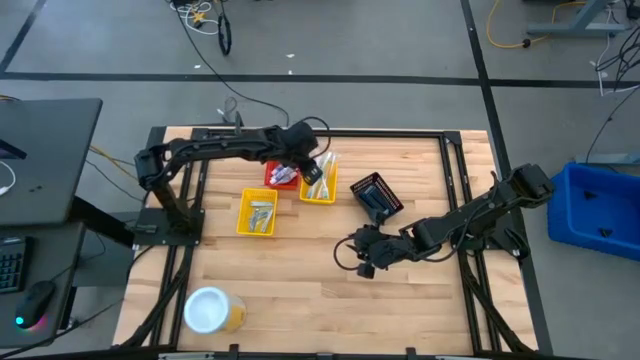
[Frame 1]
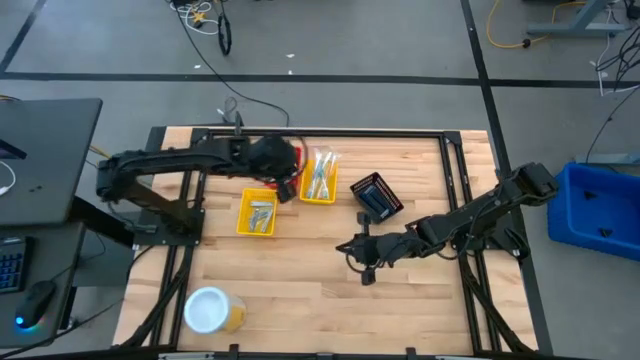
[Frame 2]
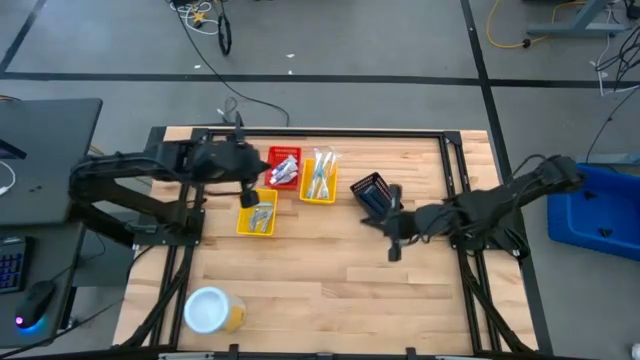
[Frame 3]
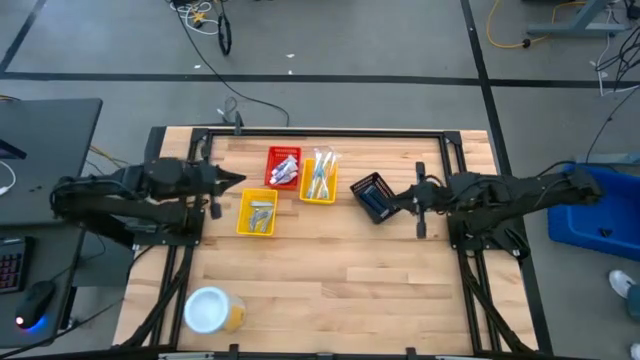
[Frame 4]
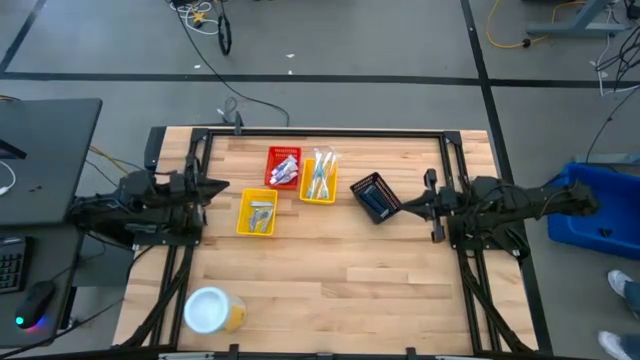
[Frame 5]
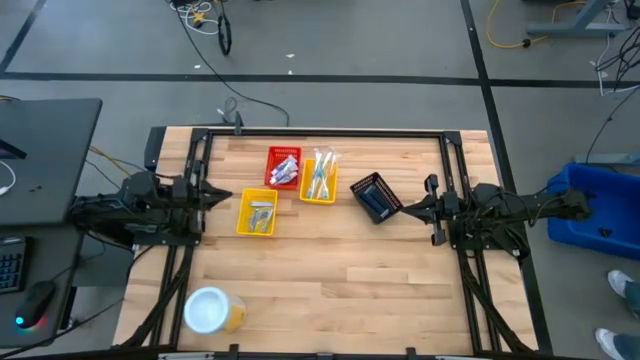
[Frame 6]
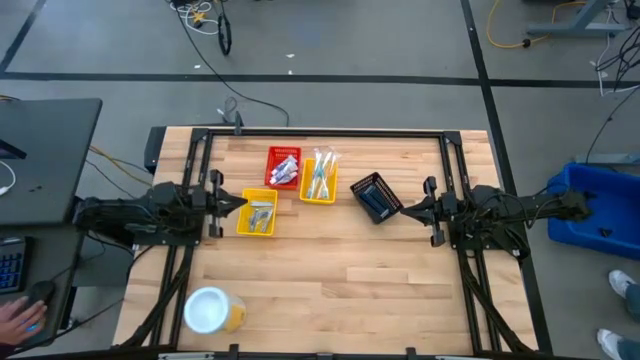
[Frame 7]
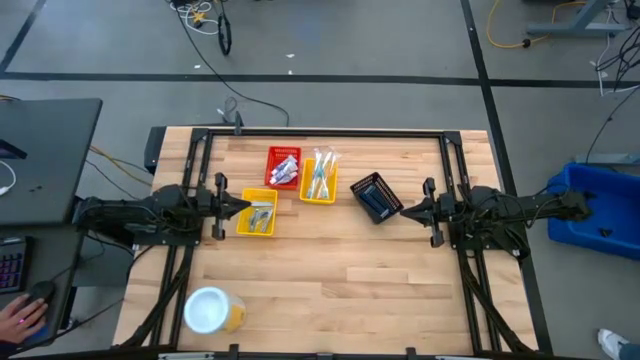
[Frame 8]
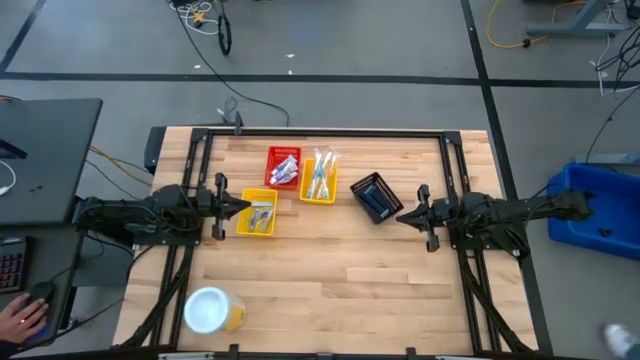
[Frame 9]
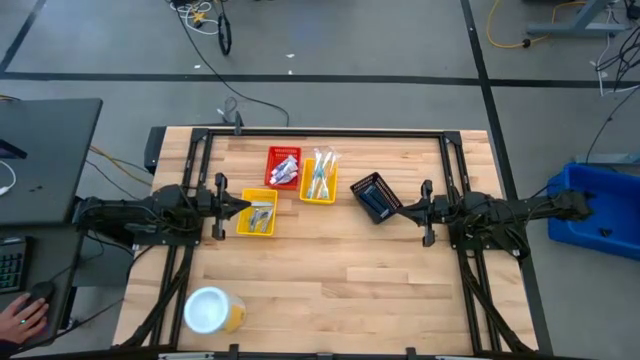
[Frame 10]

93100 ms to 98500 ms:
Task: Pick & Place Travel size toiletries
Return to Home Position

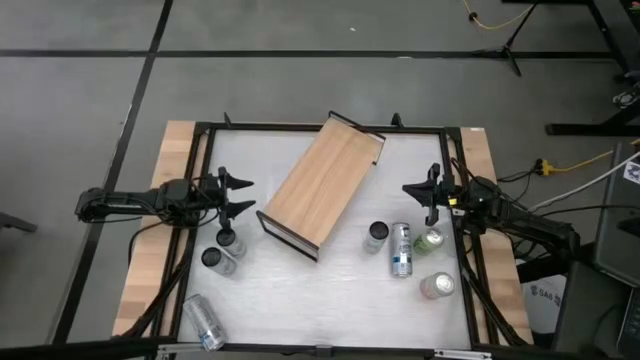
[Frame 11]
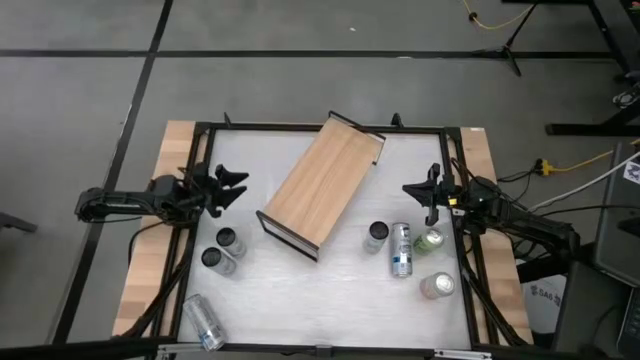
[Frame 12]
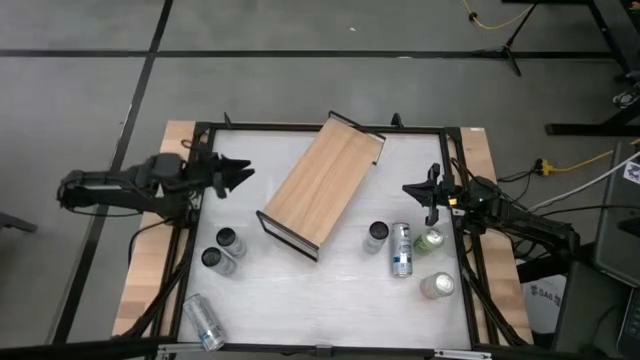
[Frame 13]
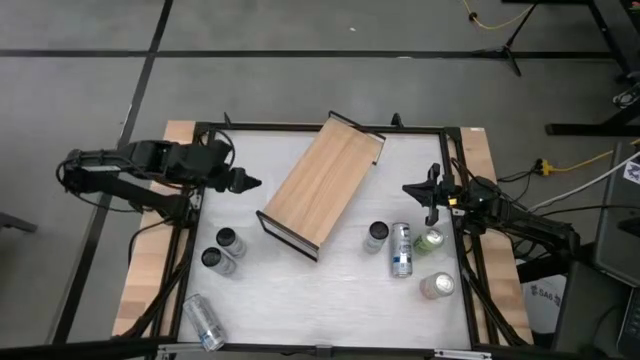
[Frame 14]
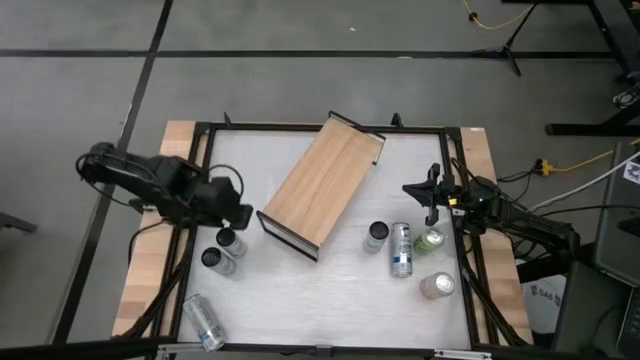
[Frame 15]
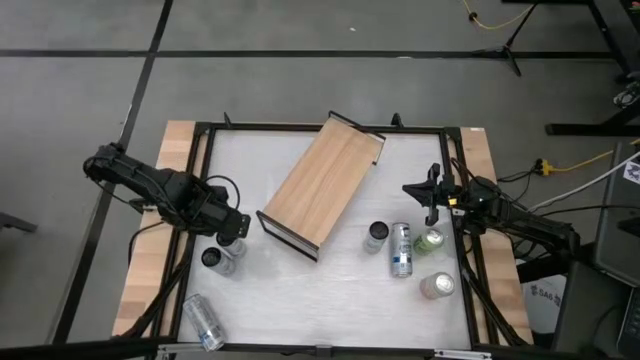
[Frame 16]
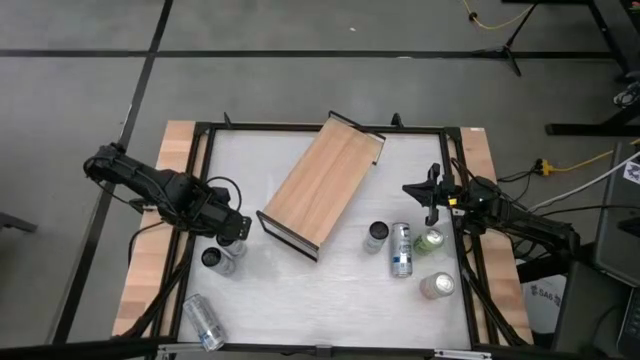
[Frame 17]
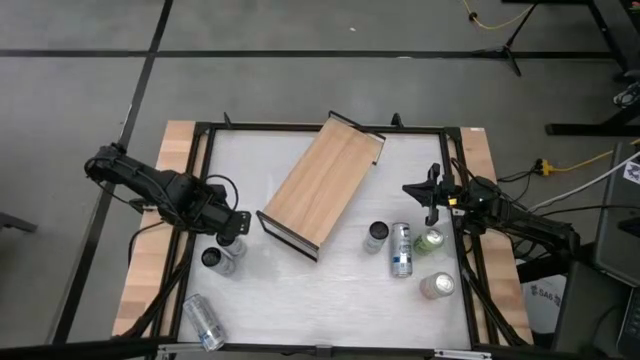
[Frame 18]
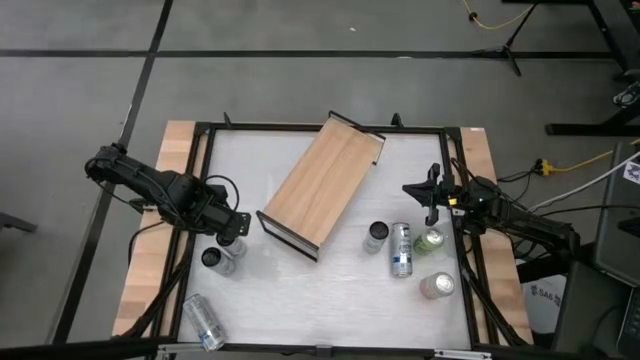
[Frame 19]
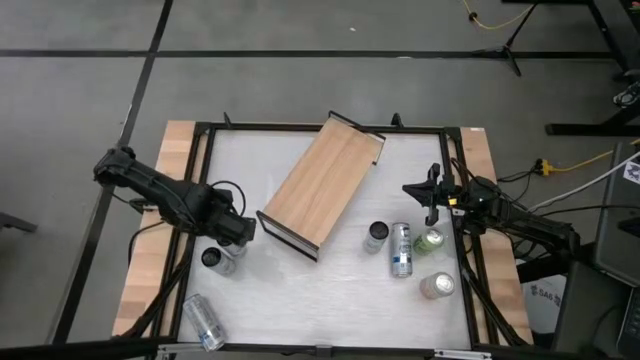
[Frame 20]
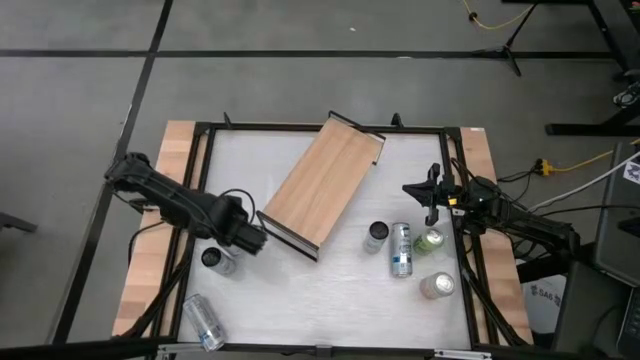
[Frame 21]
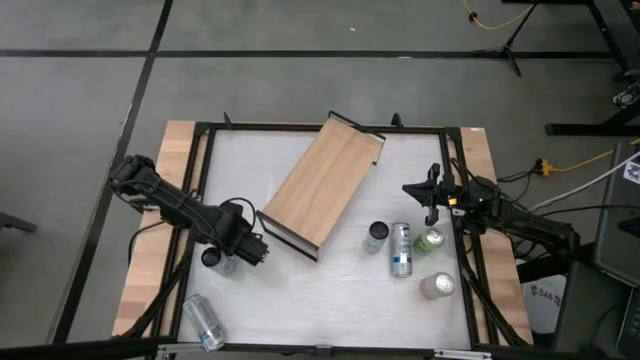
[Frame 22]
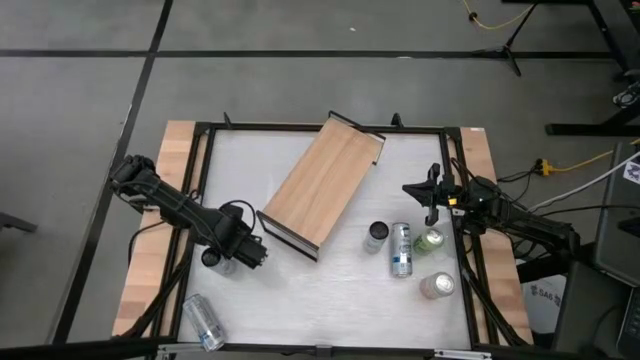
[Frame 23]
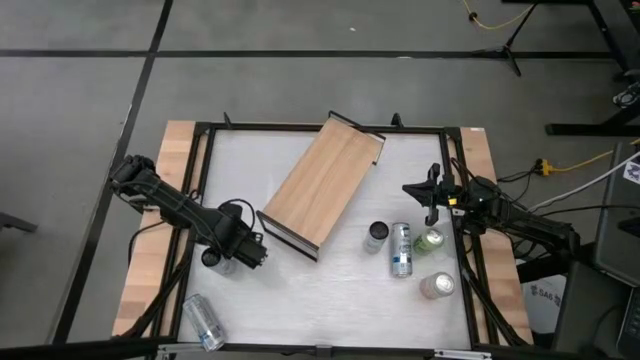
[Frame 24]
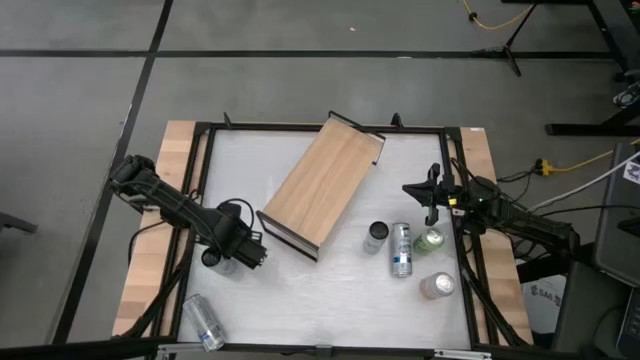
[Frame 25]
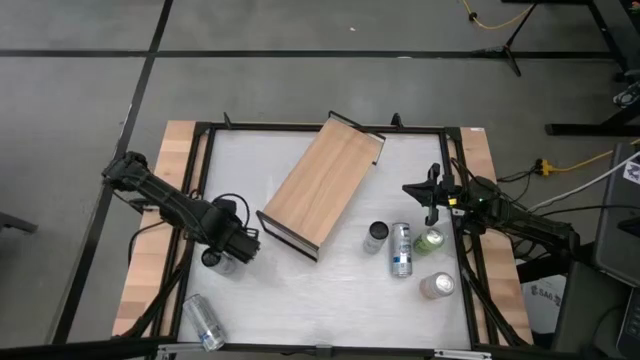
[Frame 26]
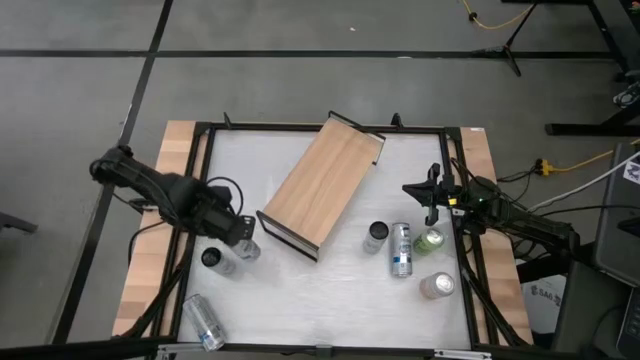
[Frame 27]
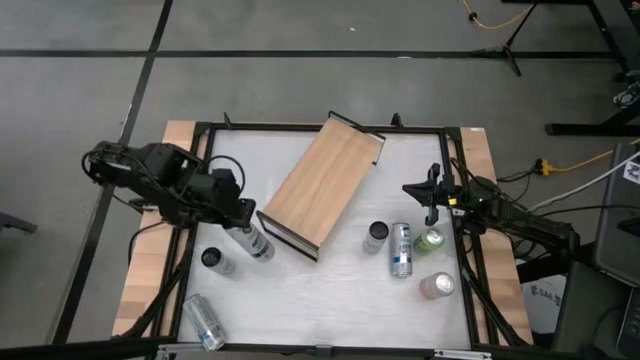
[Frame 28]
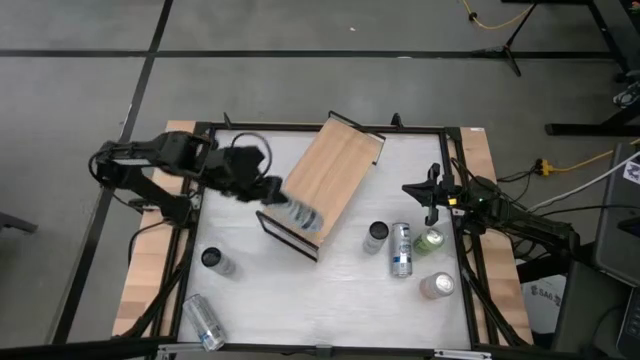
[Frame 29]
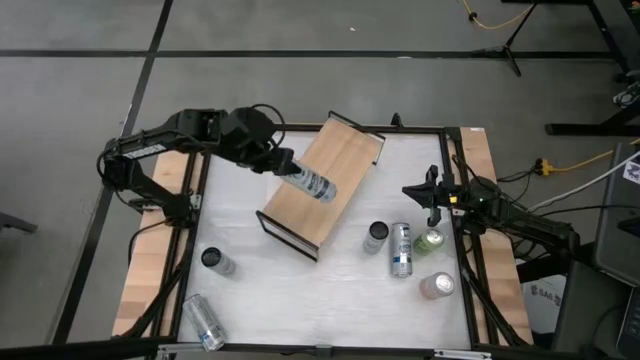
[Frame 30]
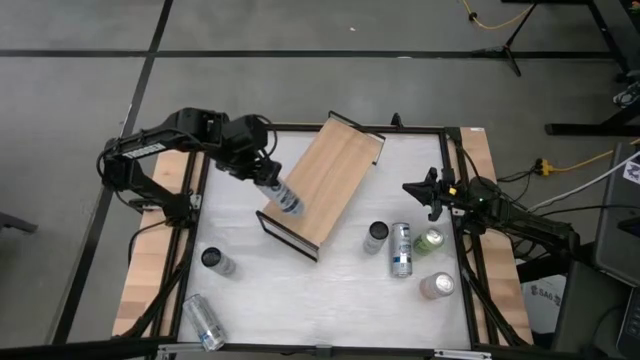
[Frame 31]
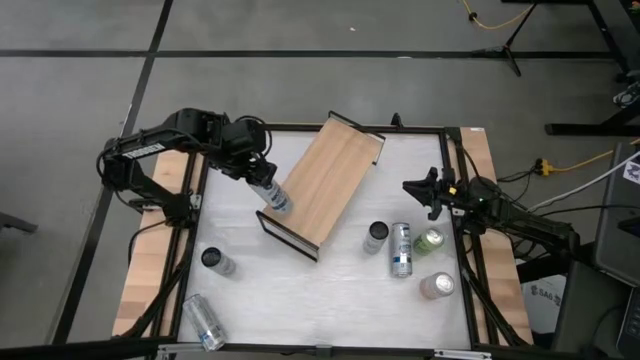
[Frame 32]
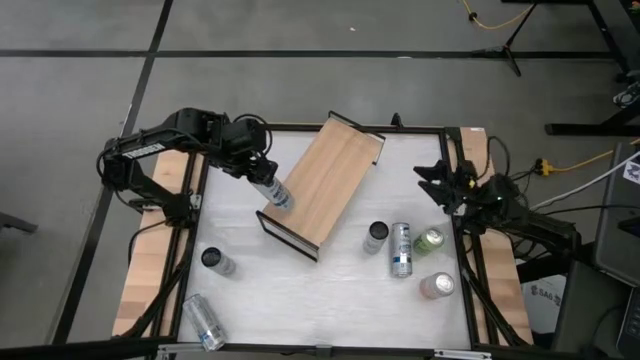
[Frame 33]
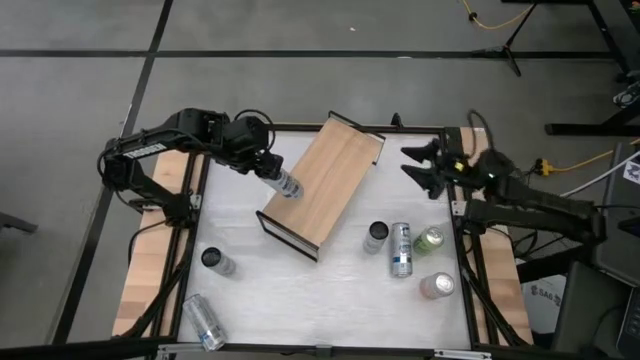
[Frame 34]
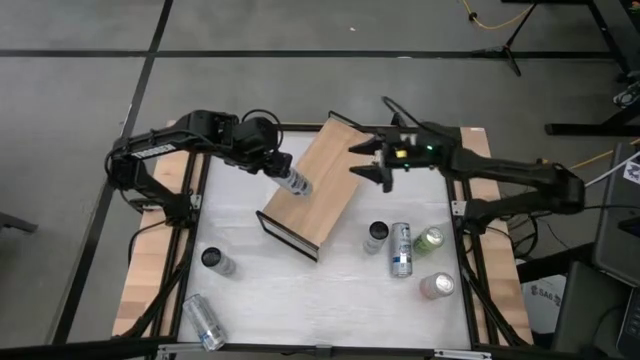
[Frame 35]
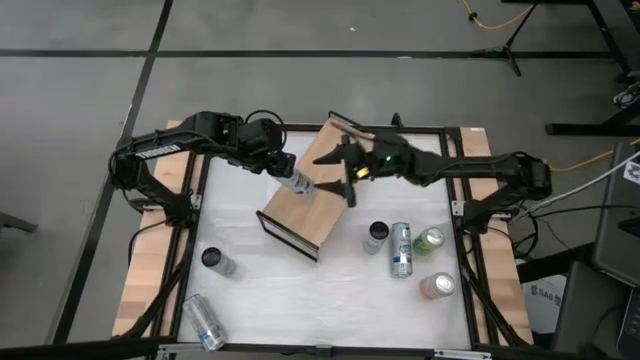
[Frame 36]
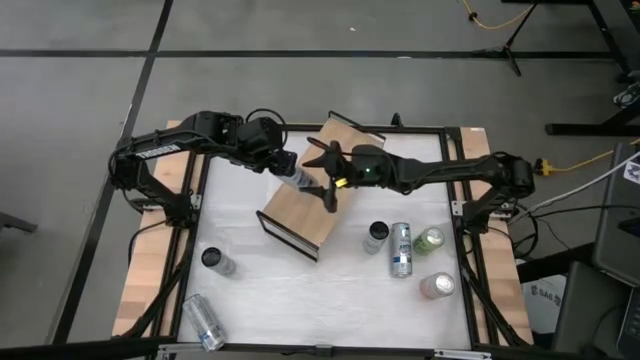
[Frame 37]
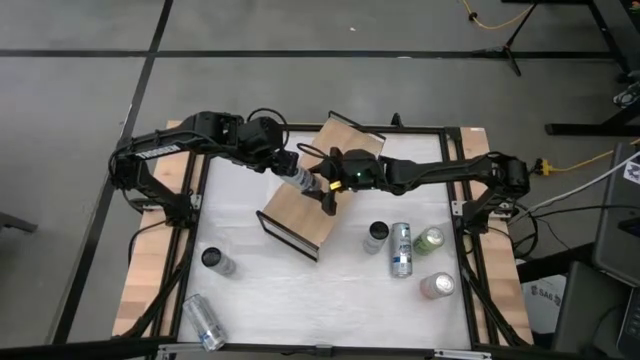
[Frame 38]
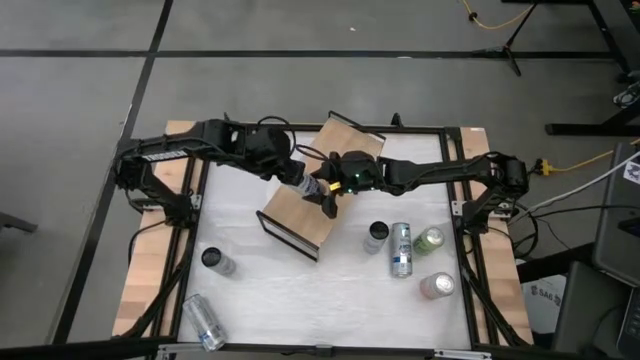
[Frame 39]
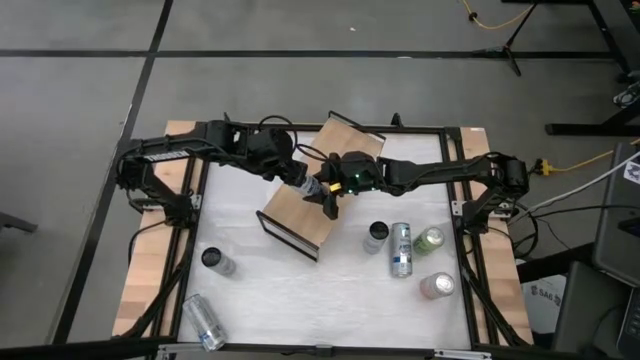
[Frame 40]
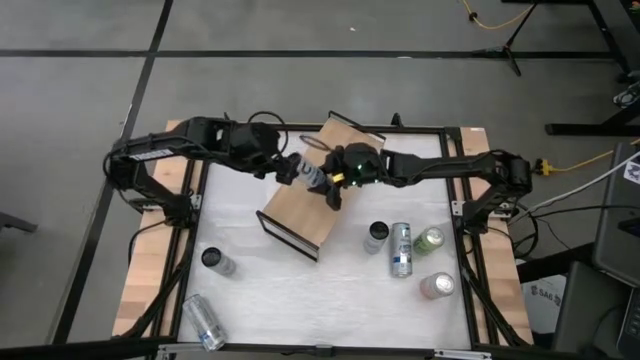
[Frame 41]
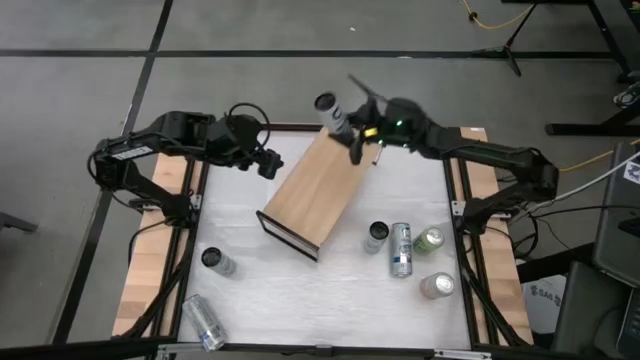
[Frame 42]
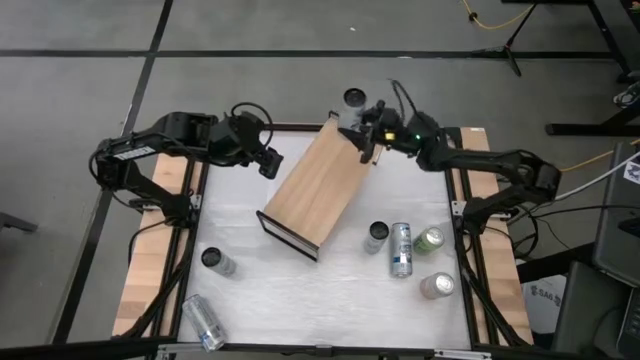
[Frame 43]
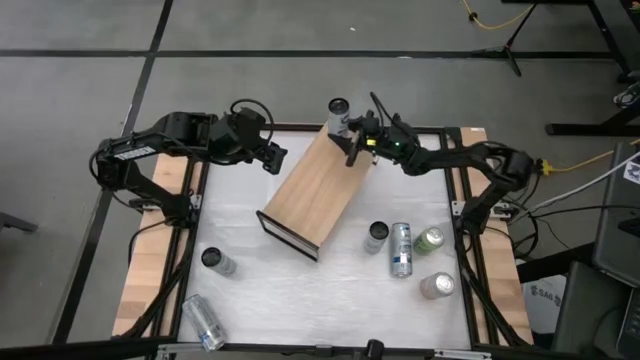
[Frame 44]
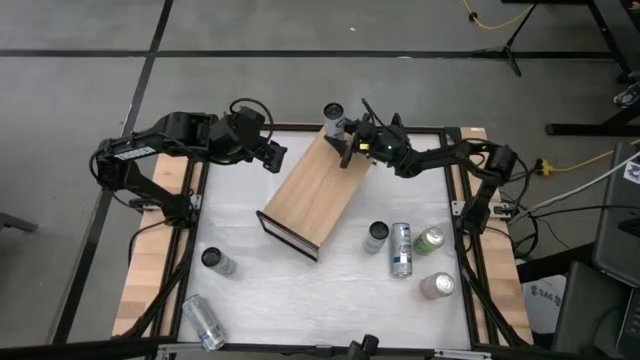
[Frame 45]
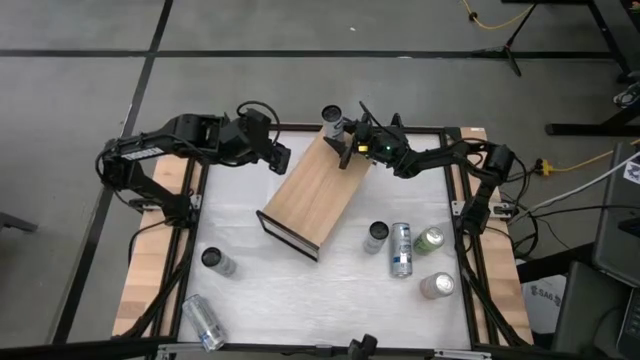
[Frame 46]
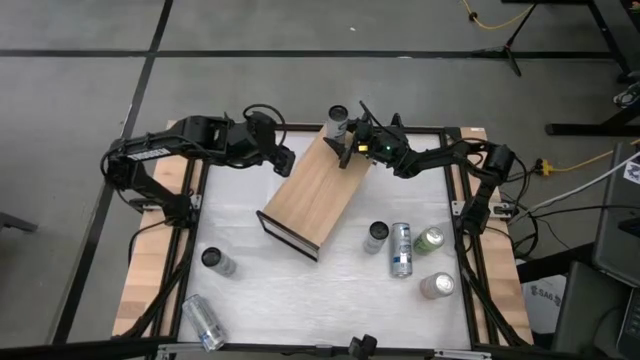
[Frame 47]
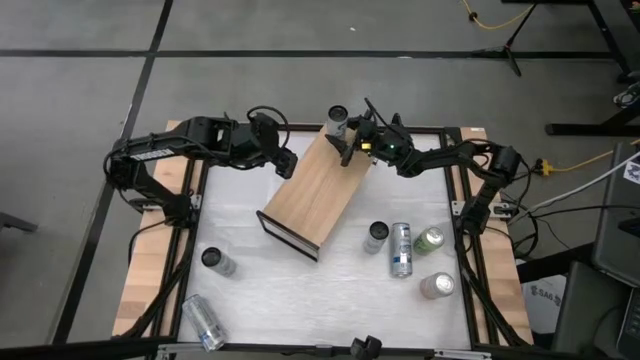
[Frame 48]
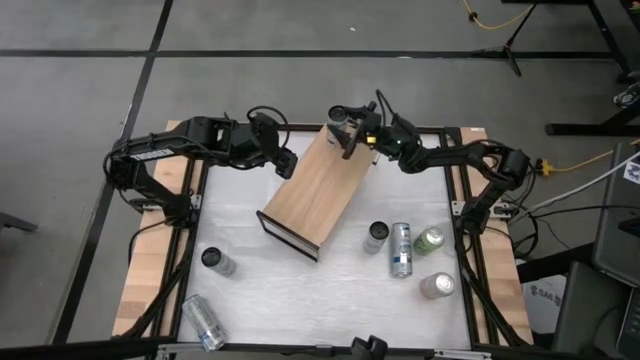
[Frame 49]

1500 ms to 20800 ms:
Task: Place canned beverage on shelf
Put the white soda can on the shelf
